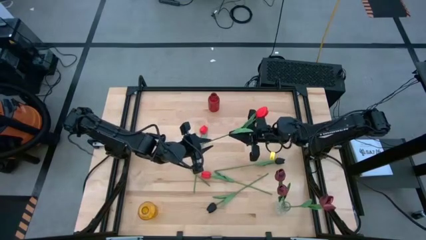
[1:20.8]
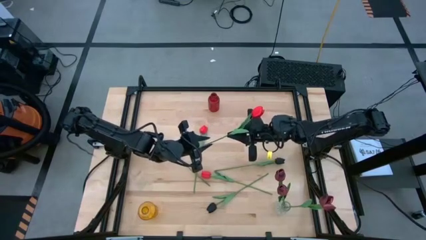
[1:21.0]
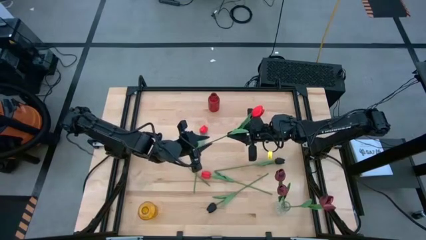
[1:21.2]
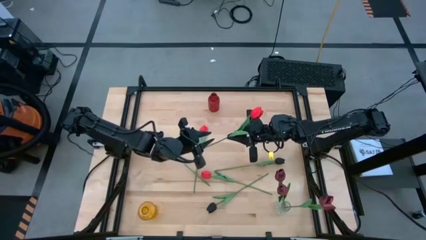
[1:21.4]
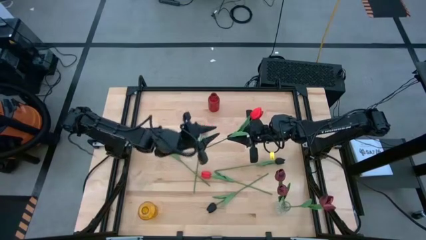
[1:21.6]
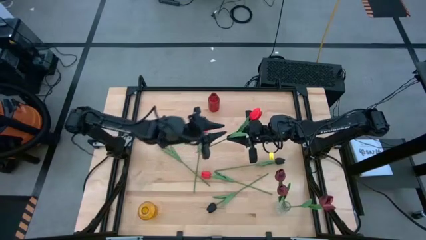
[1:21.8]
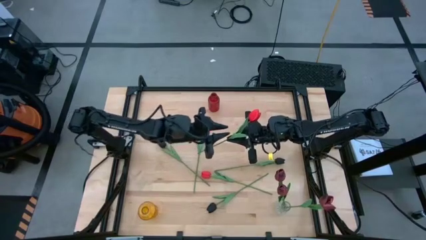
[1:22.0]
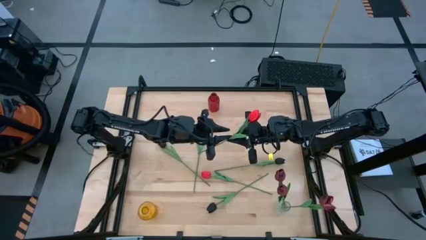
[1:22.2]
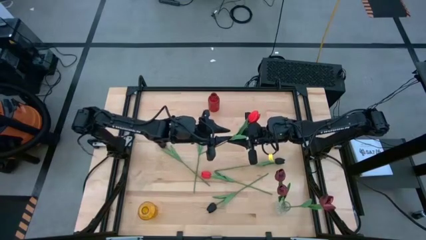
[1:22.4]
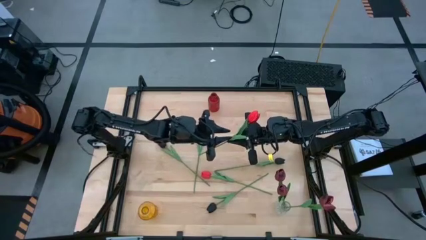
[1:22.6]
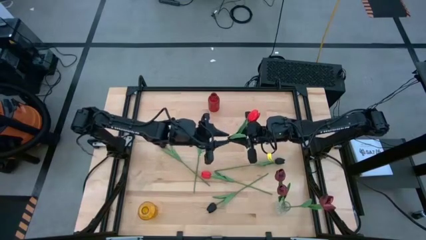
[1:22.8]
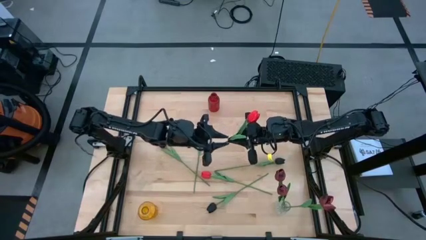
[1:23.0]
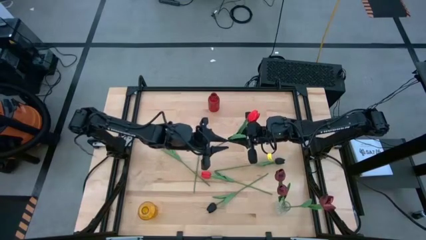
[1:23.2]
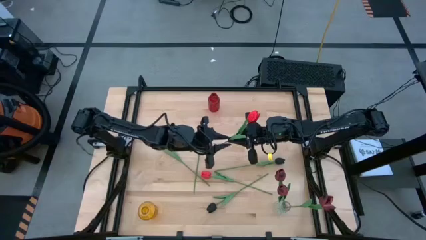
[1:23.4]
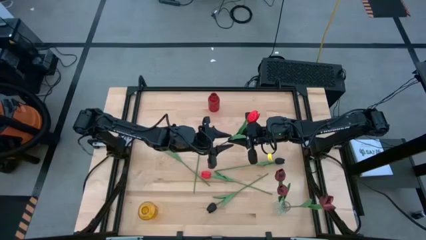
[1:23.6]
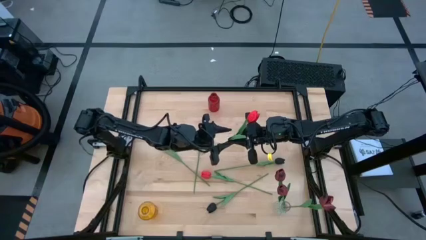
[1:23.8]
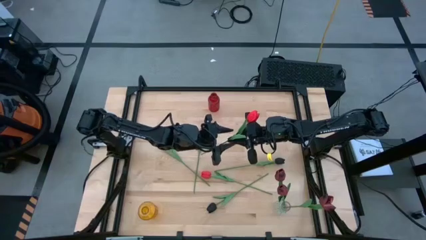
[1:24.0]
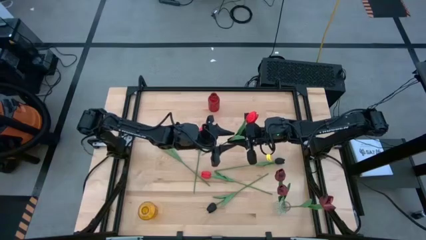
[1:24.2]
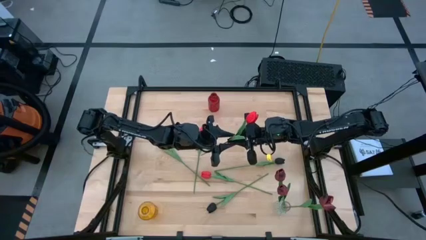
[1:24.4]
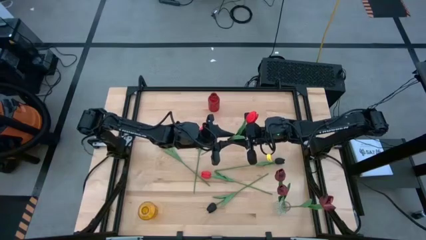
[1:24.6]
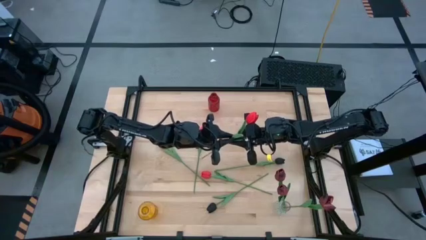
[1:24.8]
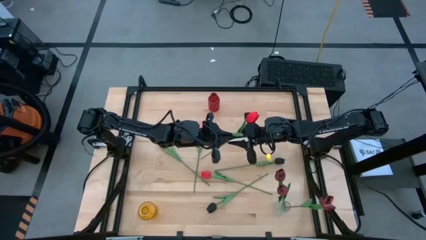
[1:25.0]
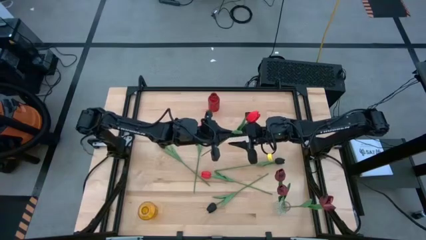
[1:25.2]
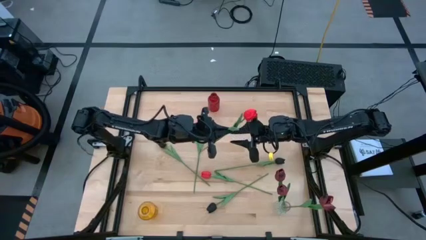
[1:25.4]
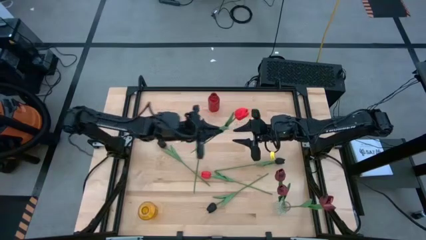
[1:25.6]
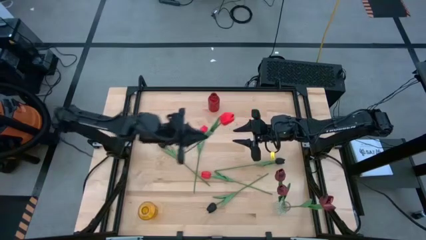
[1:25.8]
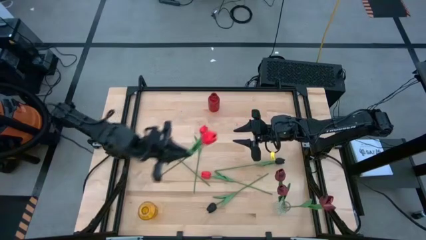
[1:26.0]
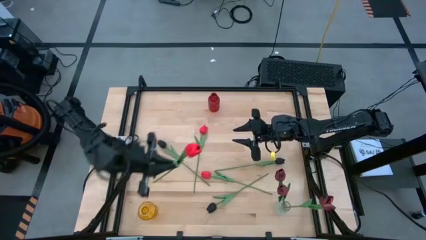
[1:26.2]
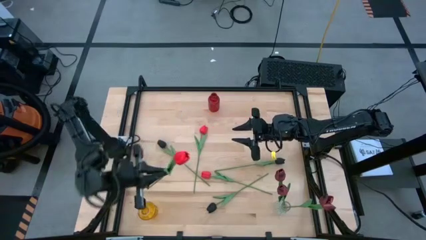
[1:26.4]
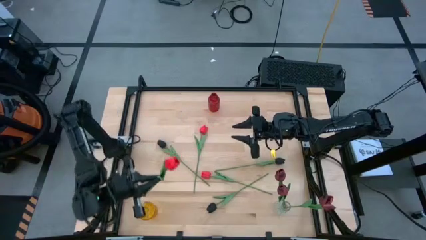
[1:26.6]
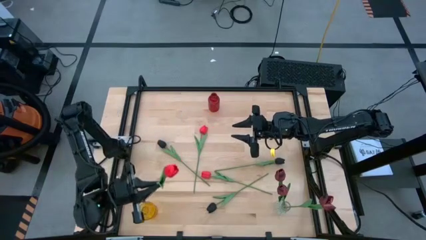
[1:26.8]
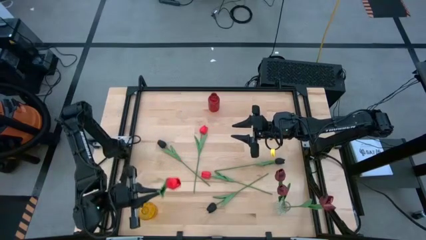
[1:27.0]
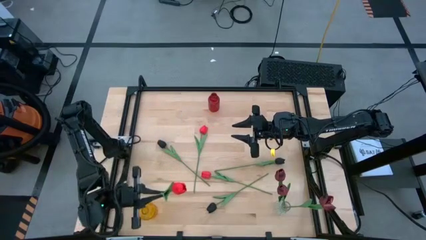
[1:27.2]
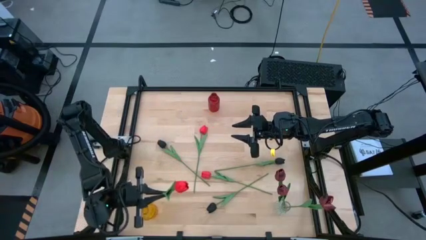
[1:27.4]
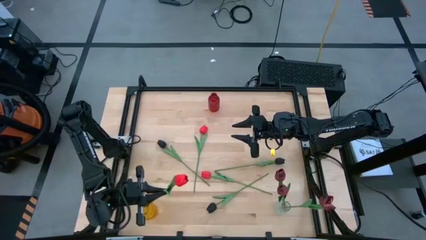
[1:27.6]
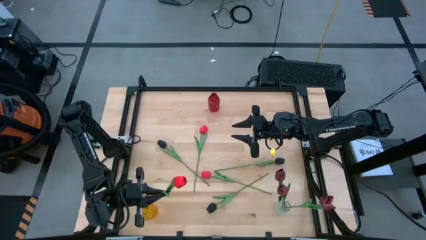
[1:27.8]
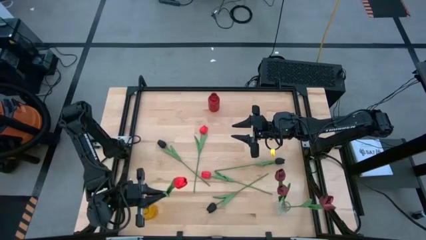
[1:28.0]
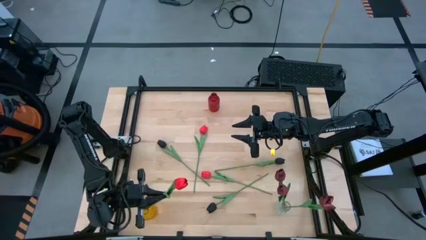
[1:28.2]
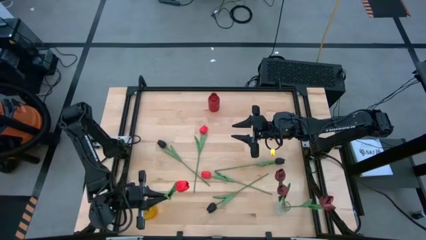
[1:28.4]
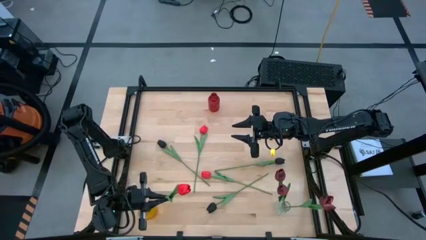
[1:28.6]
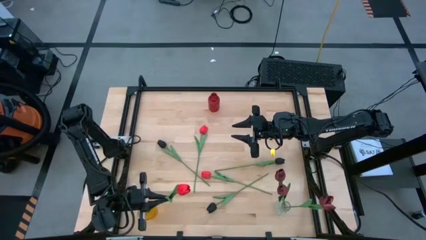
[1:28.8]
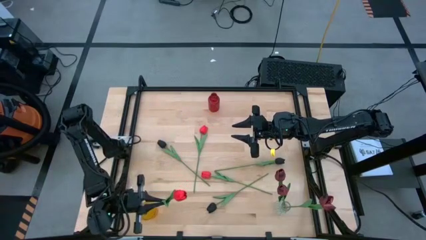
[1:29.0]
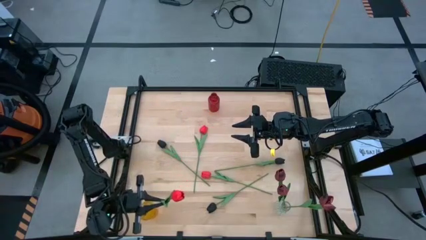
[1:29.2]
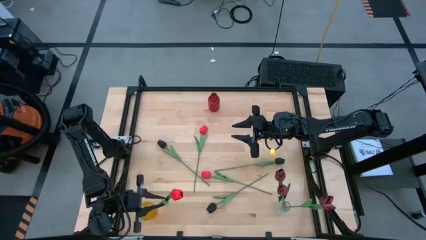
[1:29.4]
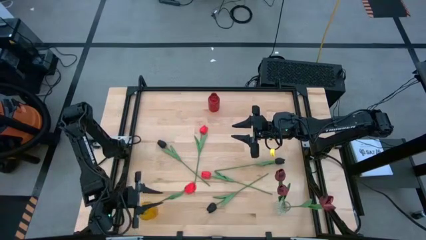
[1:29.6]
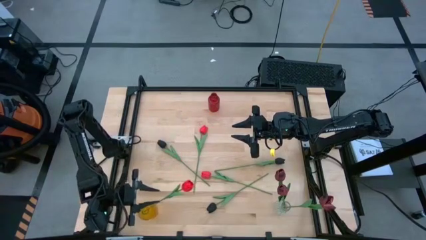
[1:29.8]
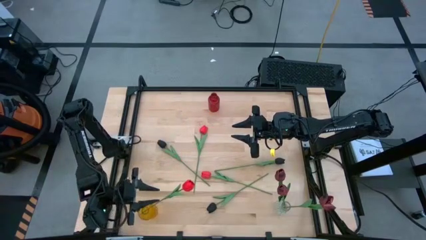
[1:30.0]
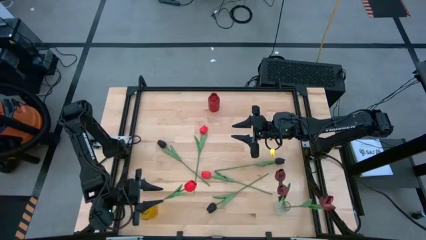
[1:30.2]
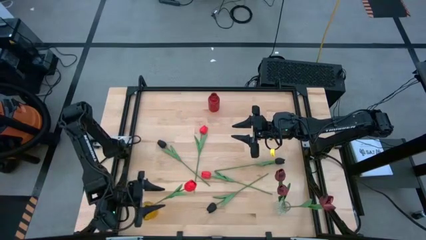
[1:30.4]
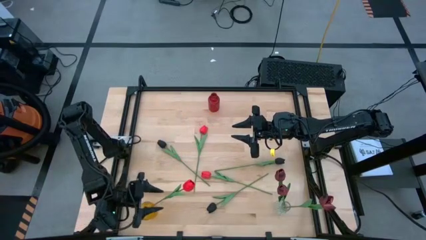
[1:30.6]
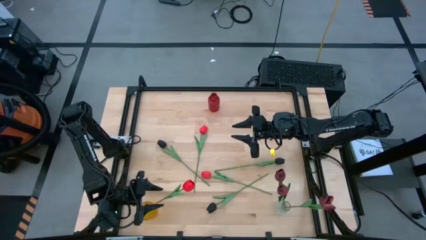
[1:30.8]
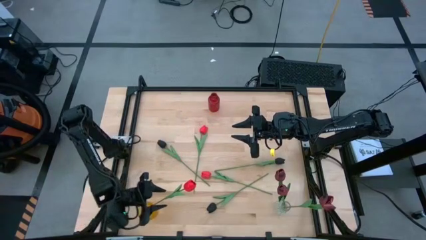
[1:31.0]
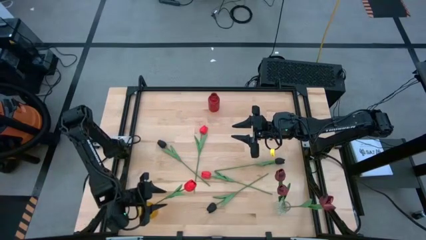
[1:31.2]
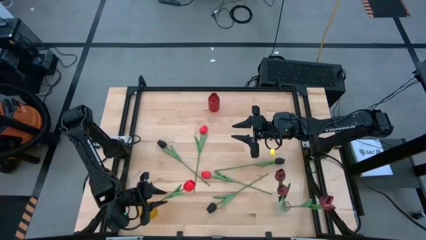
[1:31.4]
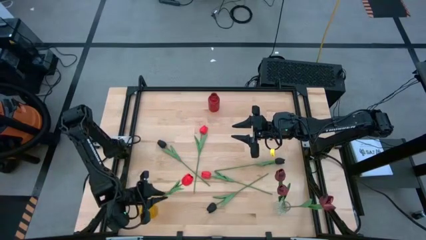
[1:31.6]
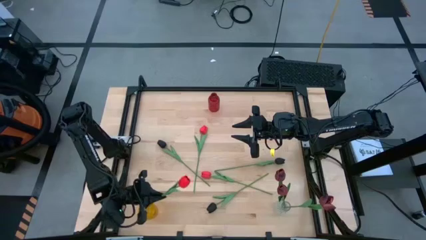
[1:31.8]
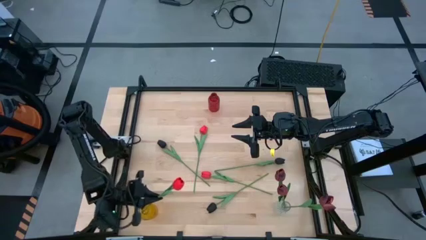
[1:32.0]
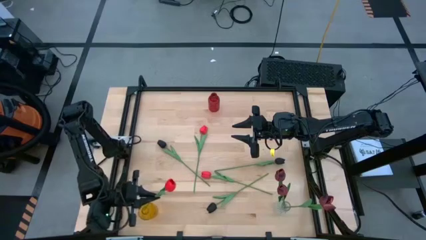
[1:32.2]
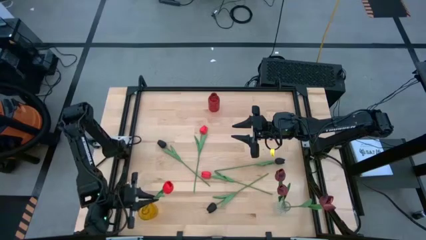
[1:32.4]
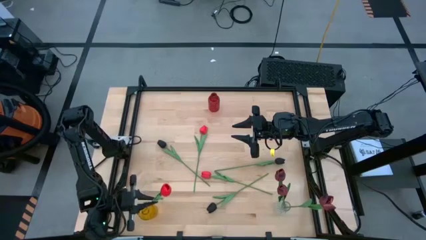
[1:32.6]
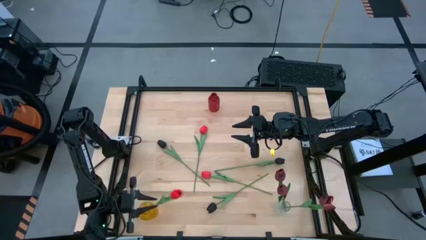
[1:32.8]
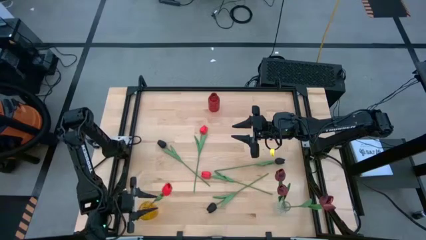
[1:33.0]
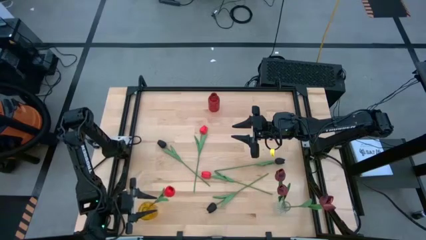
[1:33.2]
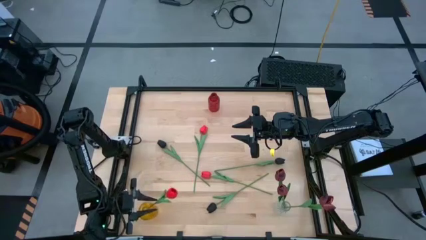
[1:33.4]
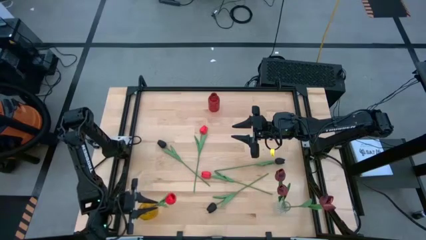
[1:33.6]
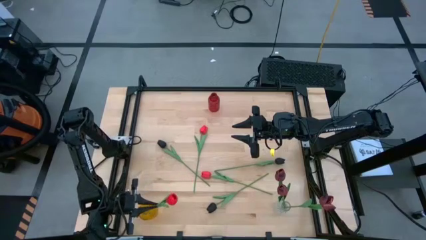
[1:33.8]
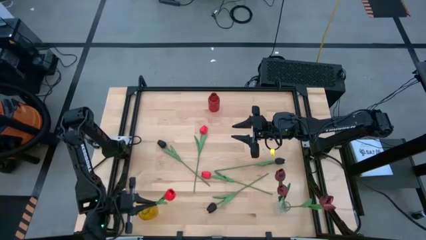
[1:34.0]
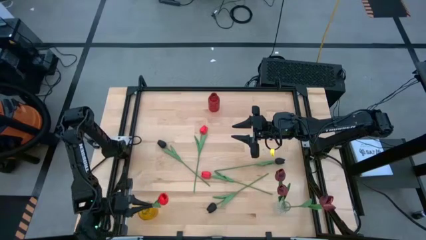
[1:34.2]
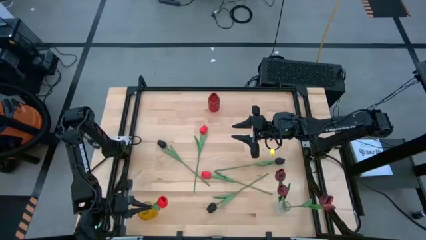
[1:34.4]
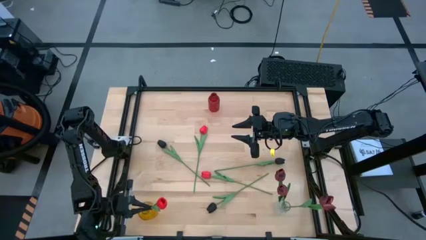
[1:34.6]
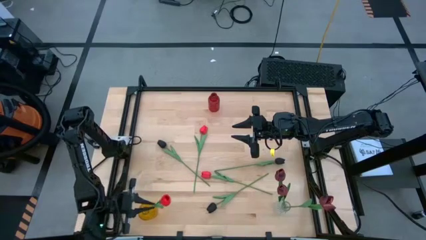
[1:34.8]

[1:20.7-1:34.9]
Task: Sort flowers into vase by color
Put the top right red flower into the yellow vase

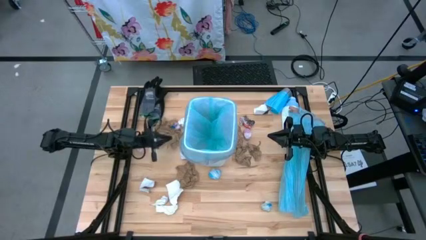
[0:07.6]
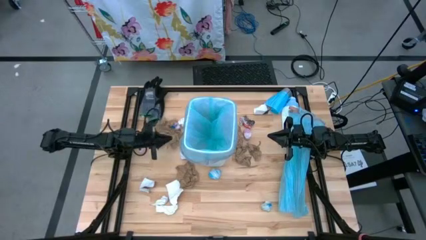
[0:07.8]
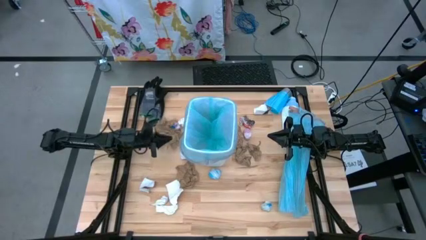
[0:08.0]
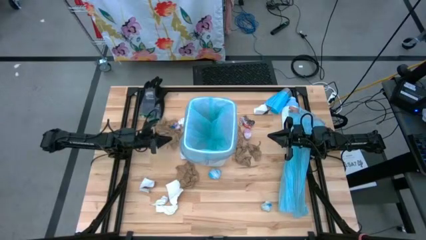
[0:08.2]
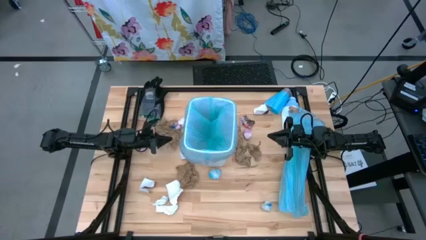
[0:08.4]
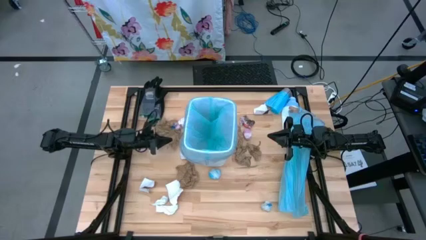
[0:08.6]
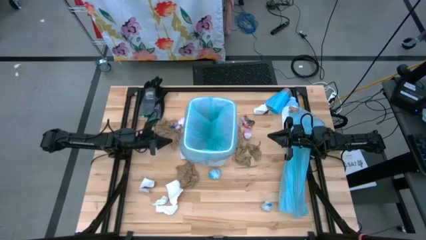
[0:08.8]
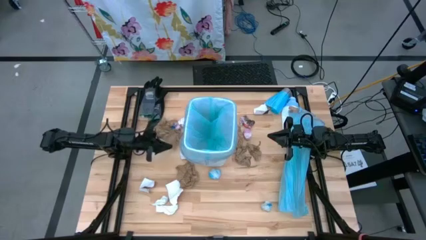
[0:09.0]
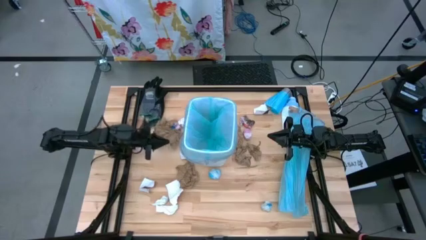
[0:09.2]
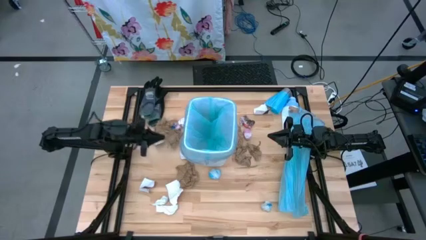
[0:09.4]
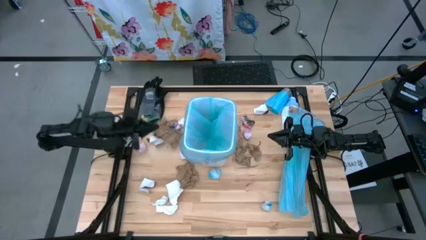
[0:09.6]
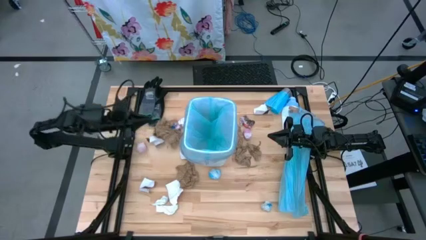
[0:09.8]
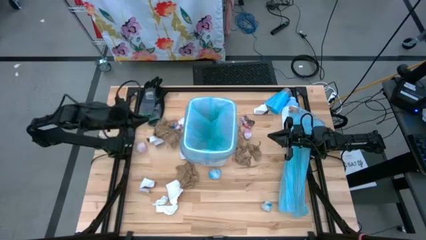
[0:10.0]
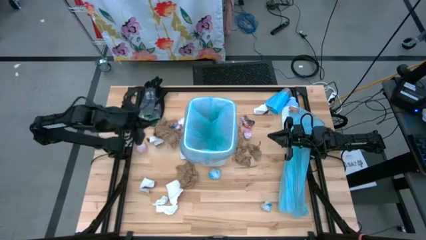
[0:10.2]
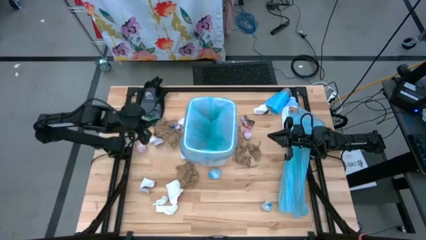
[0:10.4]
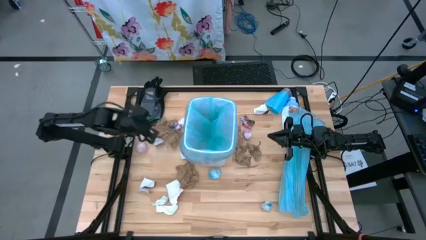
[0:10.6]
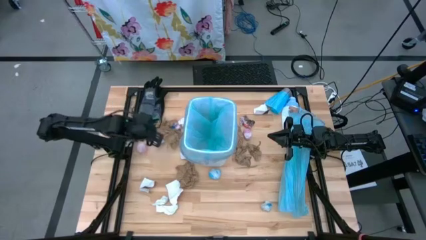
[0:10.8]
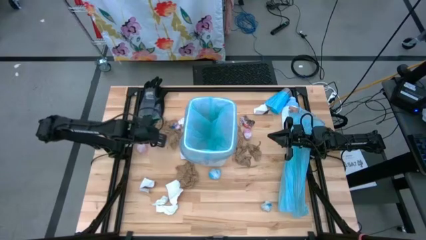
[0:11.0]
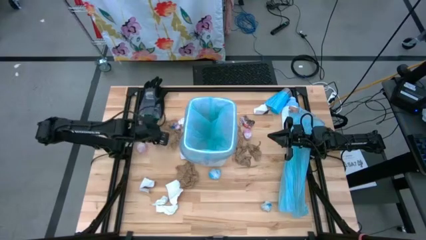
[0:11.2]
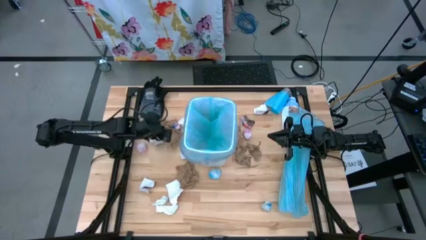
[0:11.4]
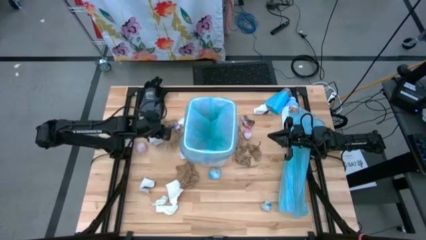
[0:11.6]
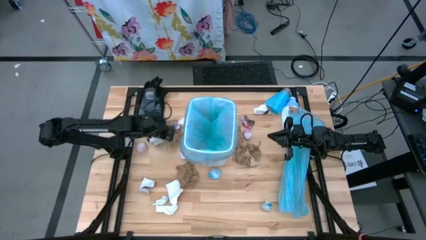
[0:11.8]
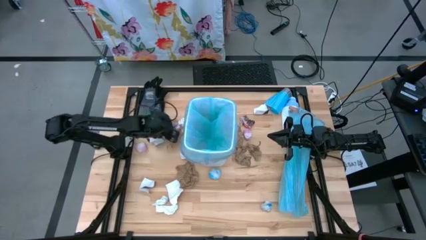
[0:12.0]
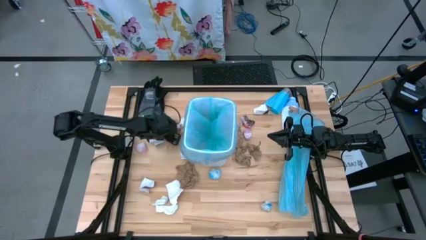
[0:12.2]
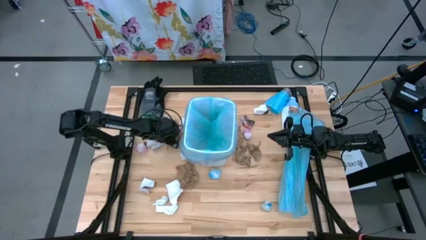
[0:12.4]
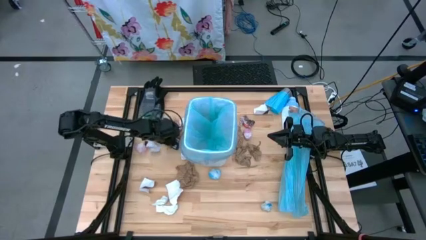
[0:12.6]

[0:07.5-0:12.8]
Task: place trash/remove bag and relplace
Put the brown napkin into the trash bin
